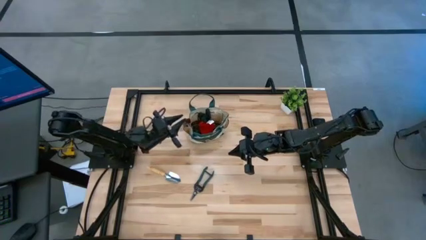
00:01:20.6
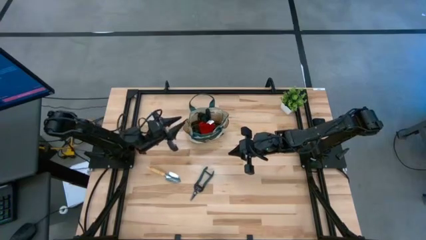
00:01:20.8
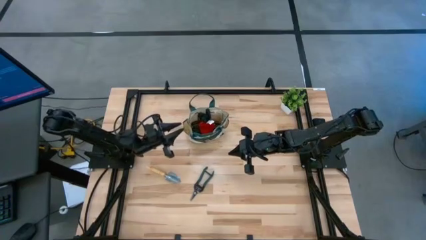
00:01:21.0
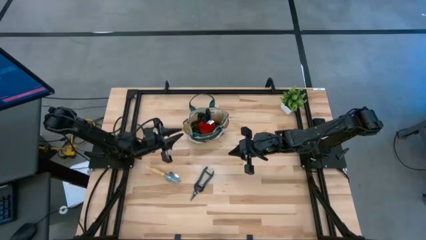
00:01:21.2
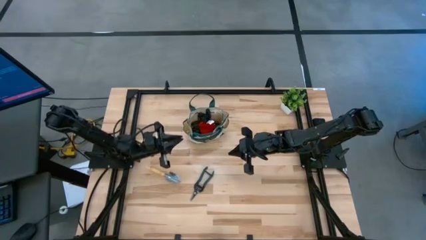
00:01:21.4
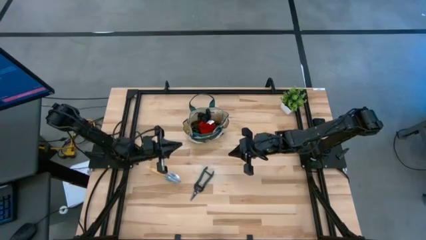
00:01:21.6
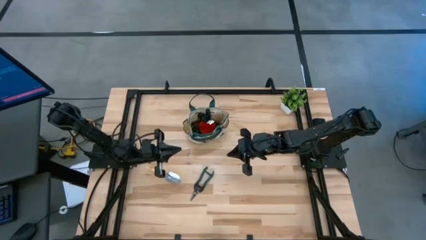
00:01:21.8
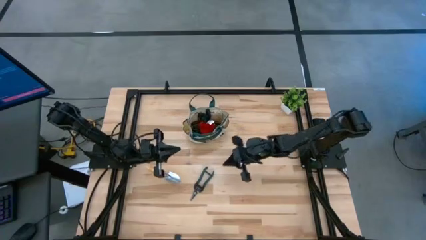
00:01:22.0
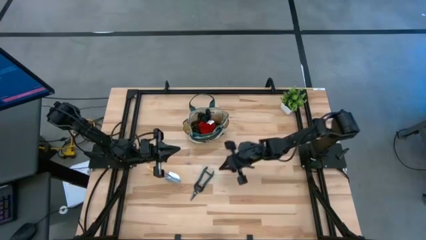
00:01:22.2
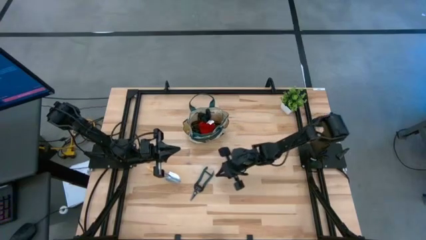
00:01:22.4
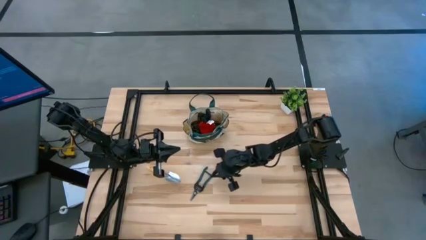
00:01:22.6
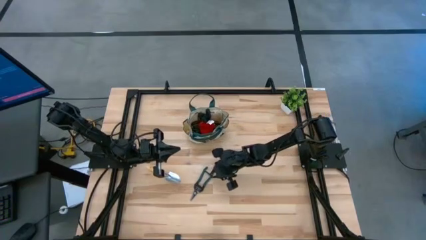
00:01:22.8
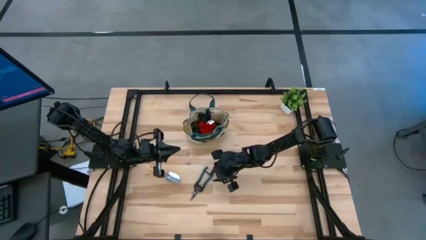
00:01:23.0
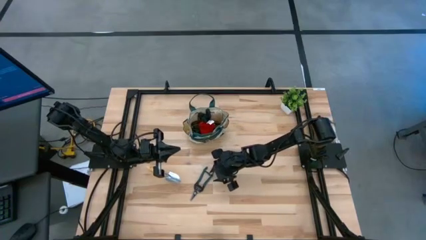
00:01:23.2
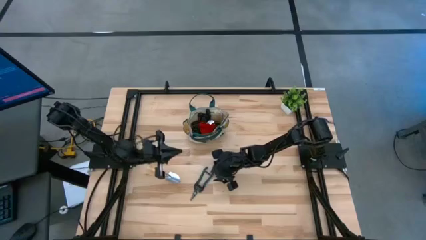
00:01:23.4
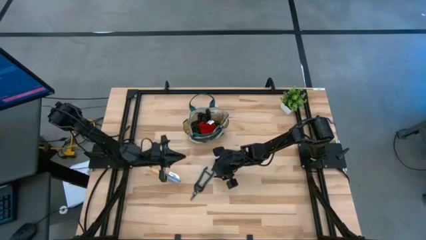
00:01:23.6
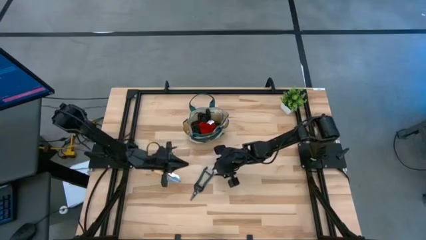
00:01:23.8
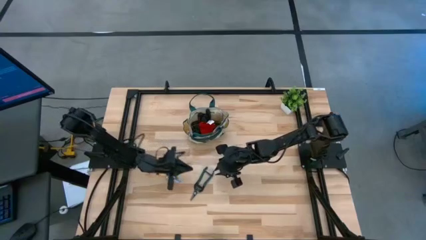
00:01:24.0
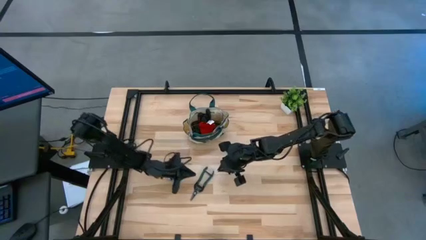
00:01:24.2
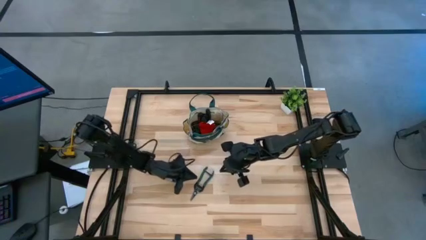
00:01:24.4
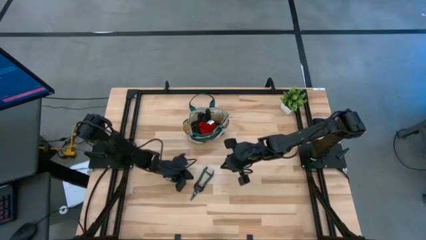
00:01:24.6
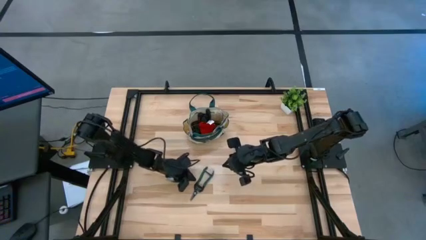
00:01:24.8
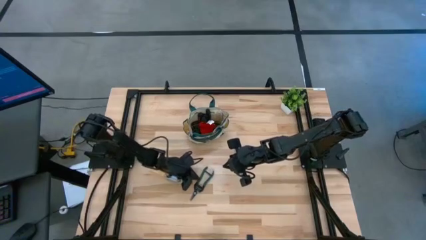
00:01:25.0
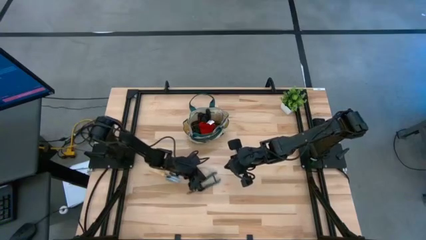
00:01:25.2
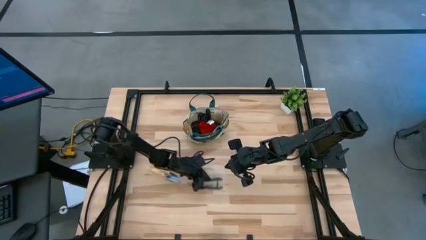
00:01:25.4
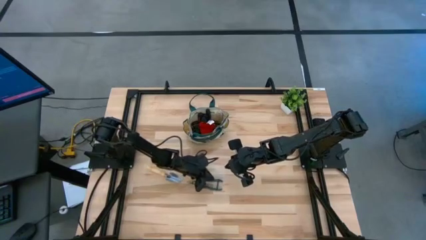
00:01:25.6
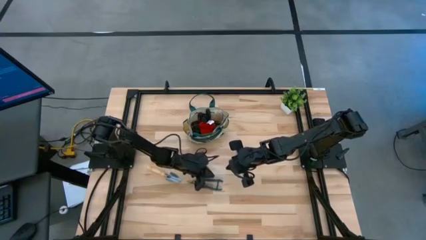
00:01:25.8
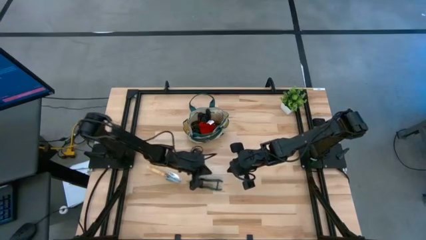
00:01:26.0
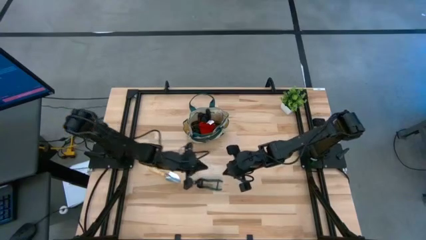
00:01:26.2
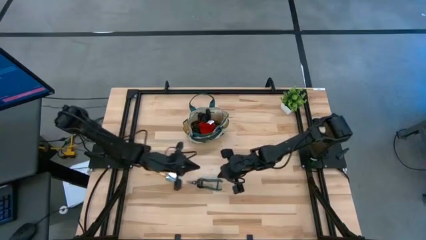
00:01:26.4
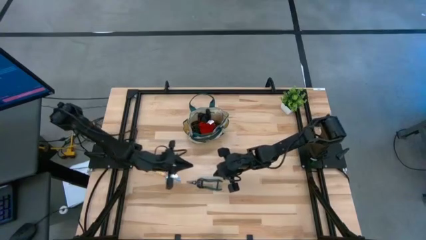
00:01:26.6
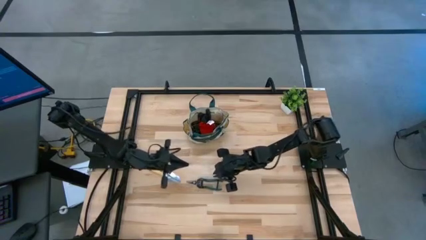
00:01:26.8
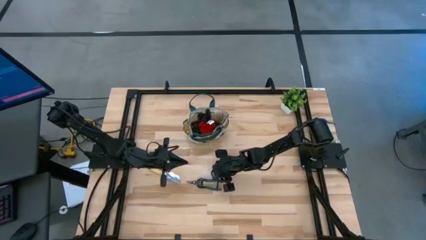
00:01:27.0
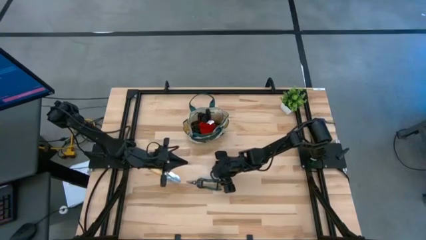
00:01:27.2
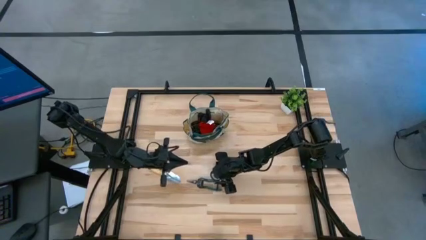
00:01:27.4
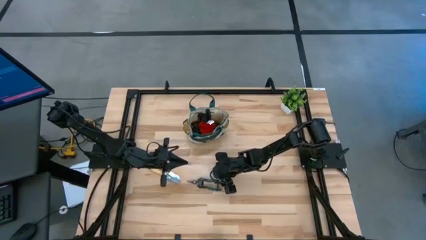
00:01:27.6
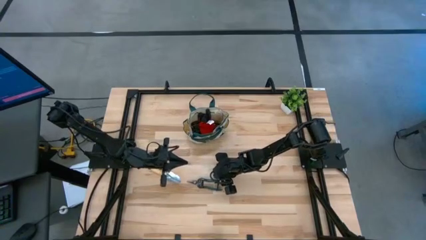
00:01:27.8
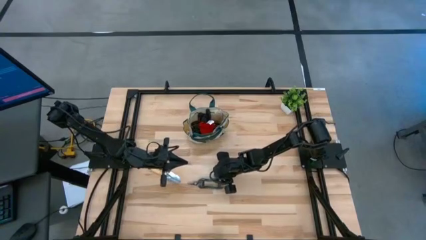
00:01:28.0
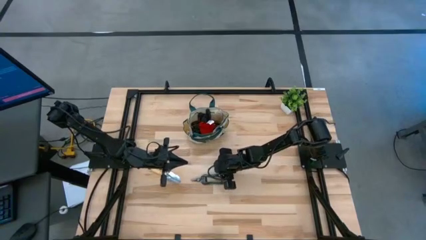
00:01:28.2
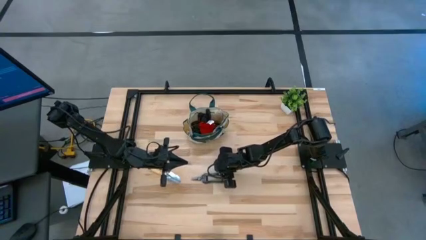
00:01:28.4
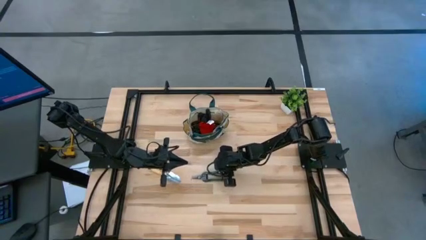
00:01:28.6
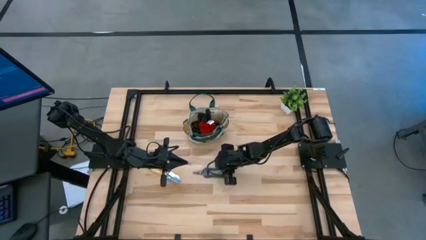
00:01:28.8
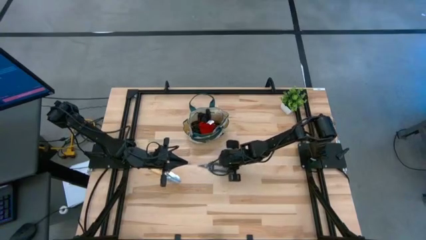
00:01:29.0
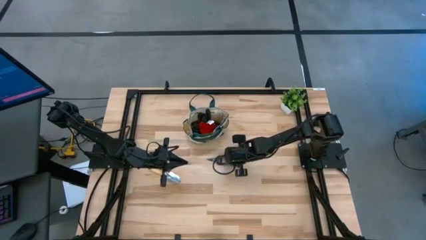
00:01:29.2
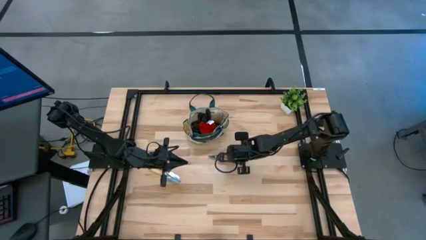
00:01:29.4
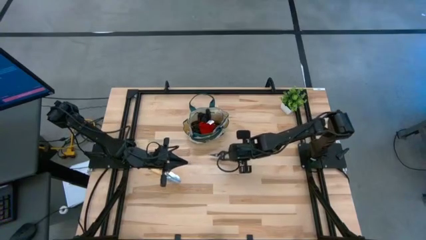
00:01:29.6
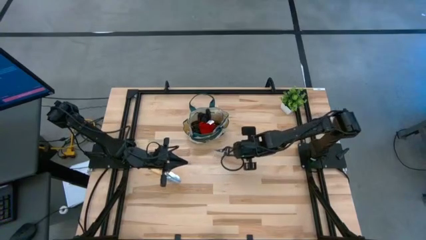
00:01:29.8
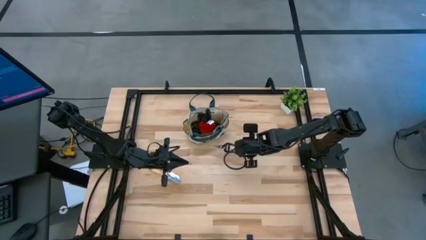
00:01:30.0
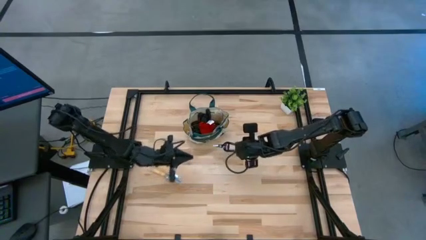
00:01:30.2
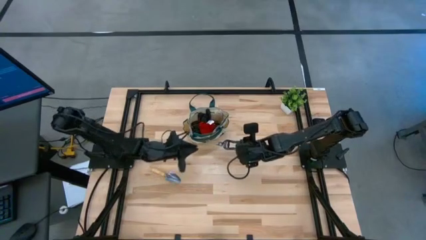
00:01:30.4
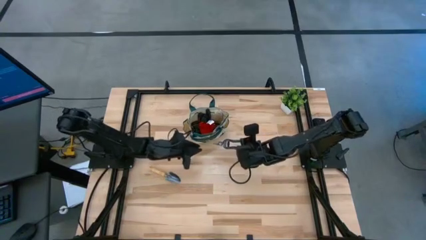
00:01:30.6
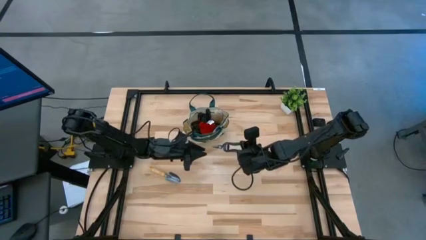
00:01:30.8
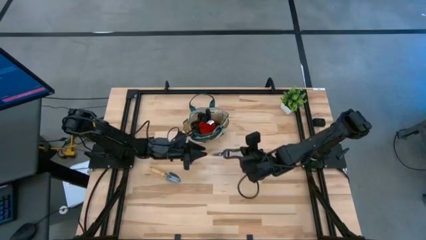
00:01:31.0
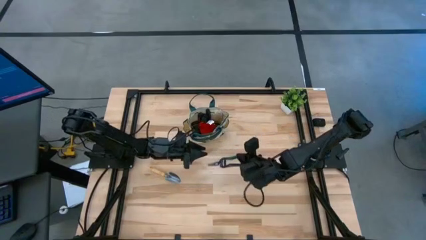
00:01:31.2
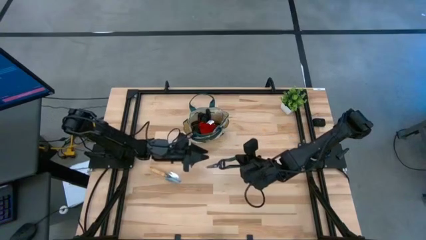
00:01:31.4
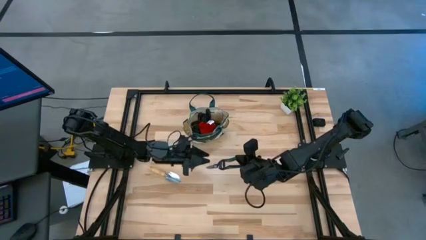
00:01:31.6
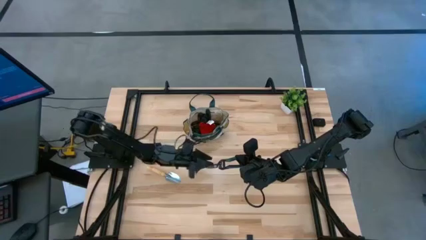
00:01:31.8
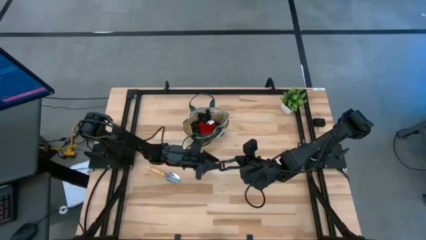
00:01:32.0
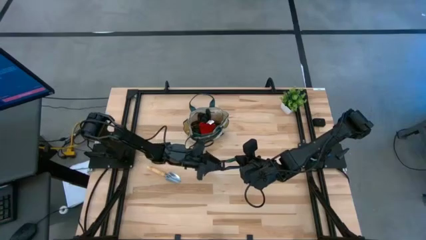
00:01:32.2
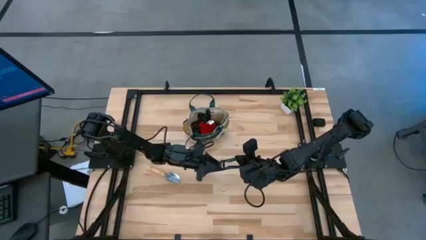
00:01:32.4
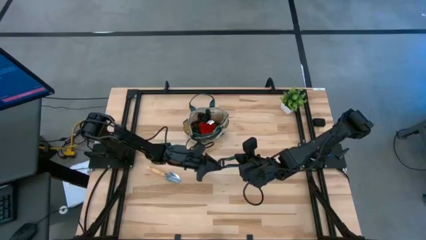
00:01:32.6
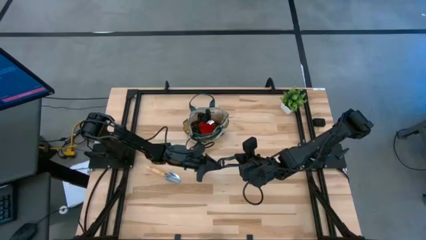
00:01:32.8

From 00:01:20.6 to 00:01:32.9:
Task: Pick & Place Garden tools in Gardening bag
Put the green shear scissors into the brown gardening bag

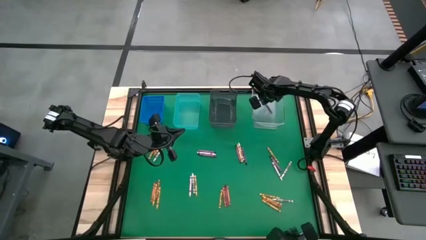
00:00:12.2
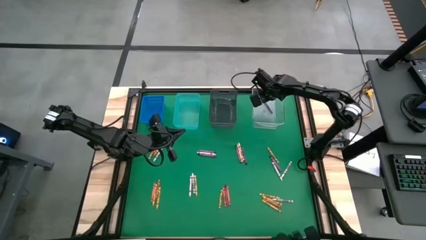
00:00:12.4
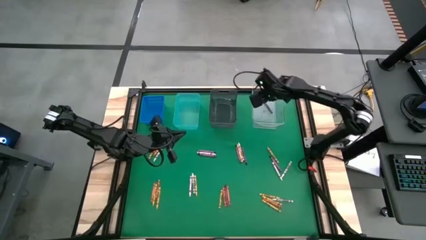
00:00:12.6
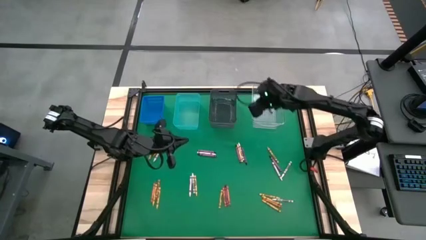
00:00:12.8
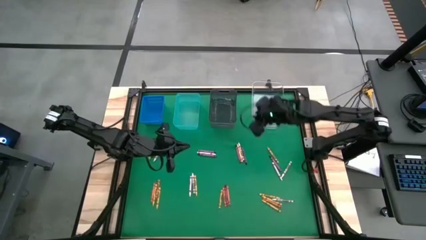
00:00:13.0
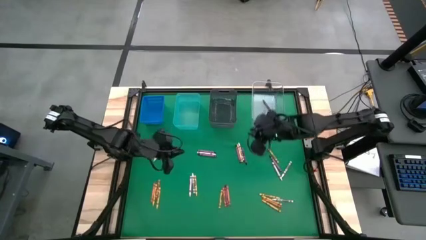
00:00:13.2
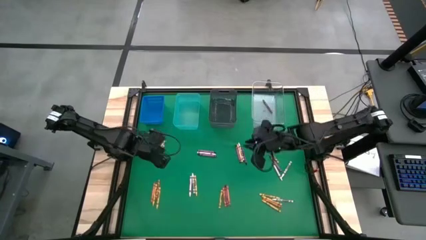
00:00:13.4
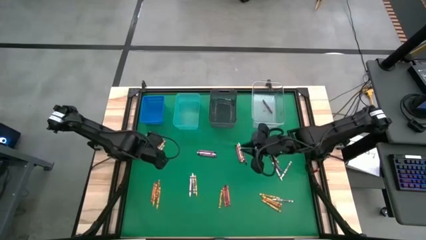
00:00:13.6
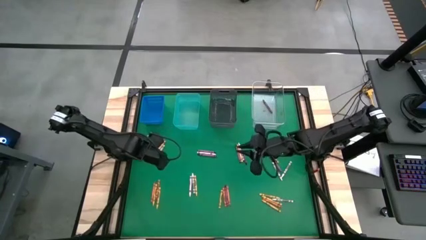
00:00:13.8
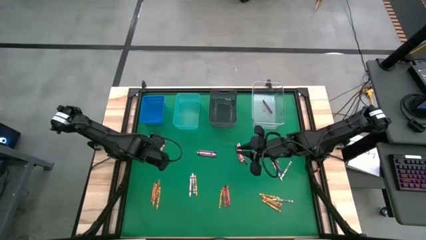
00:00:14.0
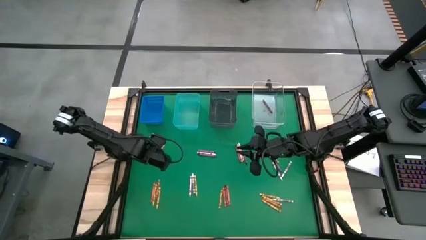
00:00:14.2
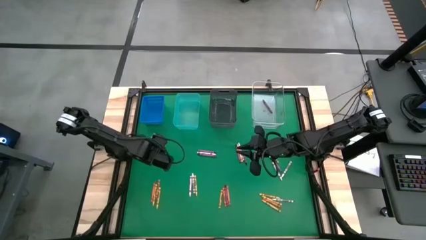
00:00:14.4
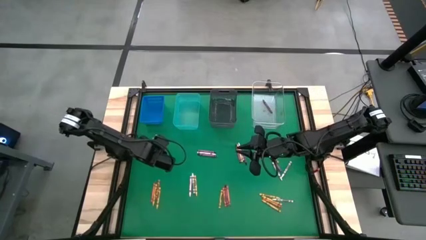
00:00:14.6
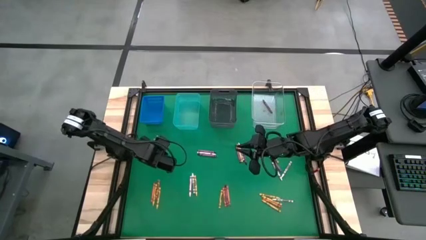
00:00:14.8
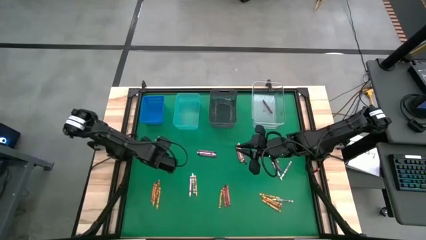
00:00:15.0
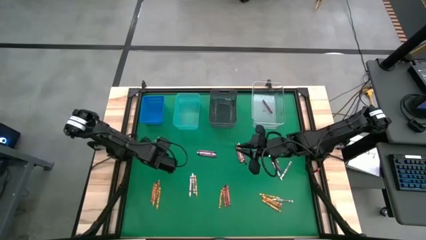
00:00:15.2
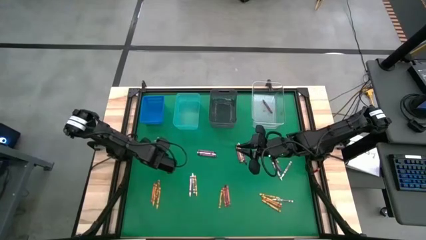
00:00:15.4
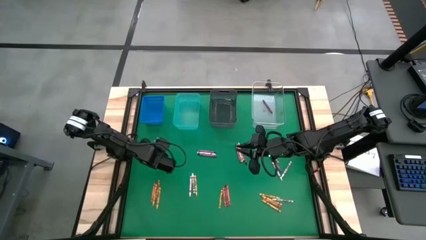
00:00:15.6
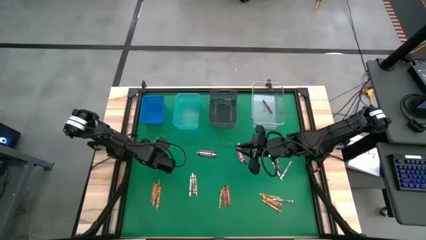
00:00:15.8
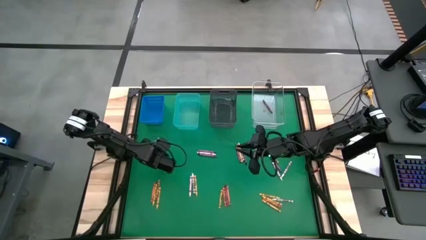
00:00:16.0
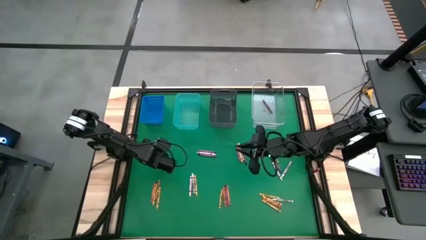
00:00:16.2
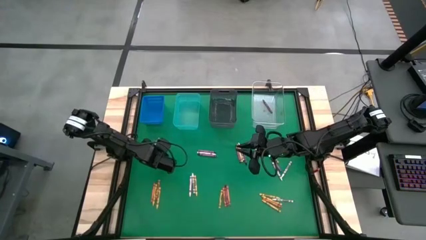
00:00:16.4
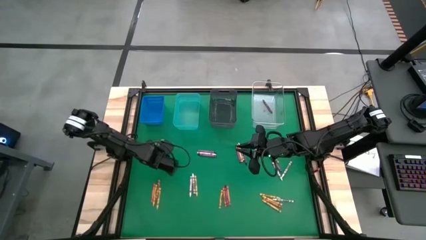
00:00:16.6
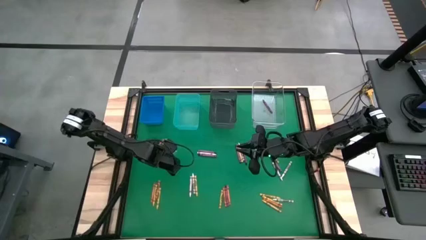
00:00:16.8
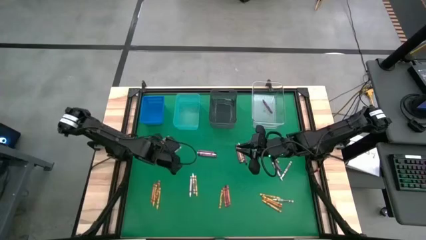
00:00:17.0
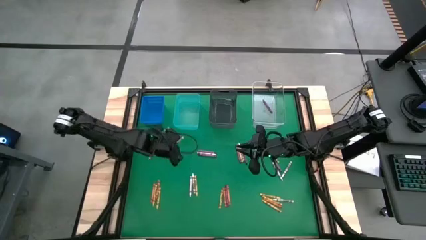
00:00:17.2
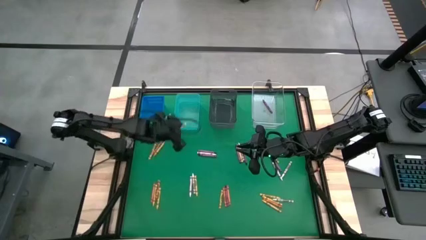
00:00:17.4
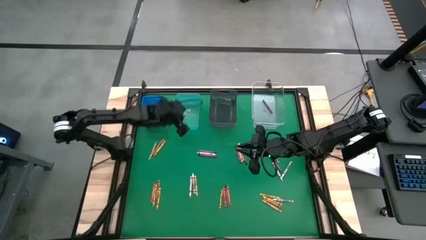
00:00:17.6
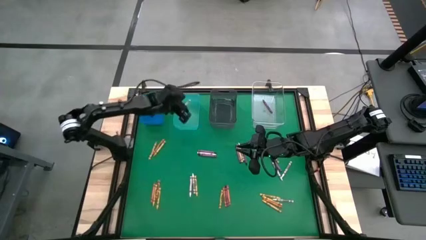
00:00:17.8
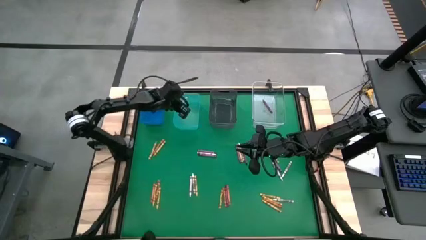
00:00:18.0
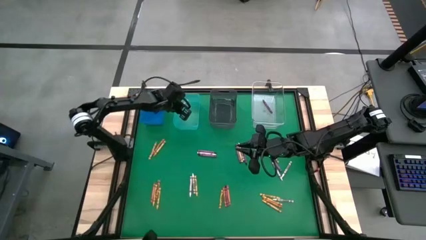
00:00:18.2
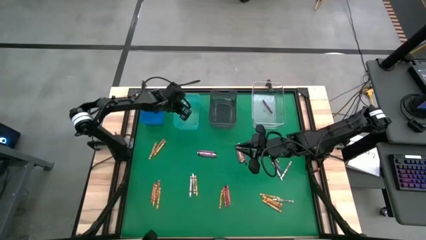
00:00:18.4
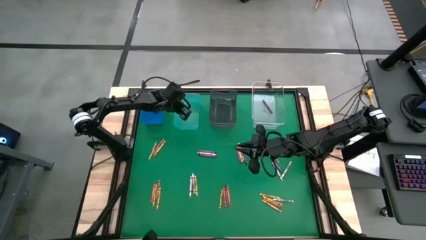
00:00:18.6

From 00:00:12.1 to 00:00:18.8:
Task: Sort crayons
Put the white crayon into the light blue bin
